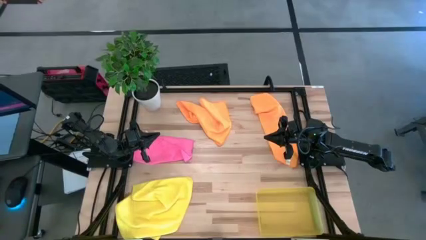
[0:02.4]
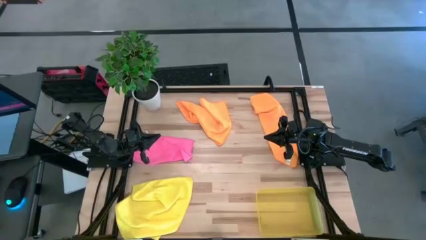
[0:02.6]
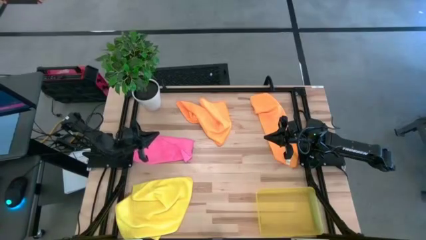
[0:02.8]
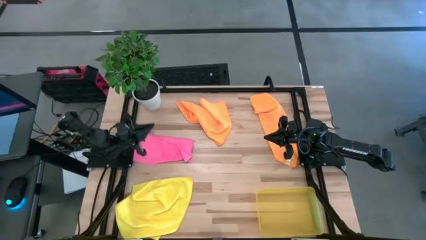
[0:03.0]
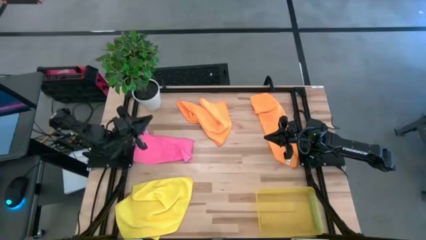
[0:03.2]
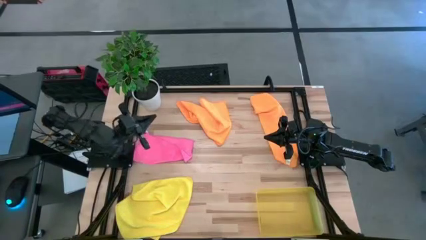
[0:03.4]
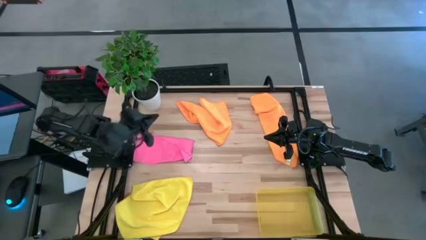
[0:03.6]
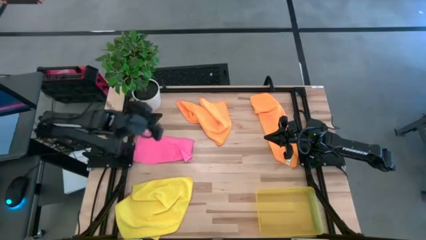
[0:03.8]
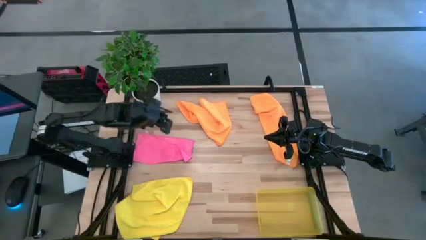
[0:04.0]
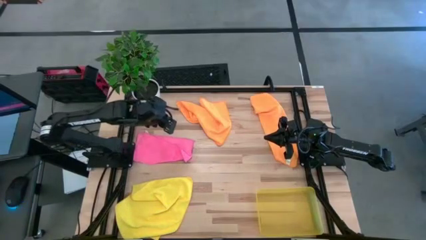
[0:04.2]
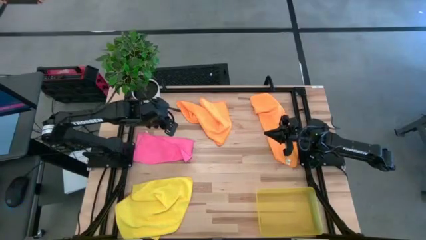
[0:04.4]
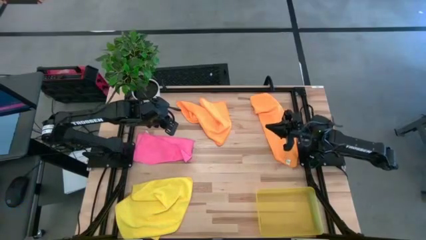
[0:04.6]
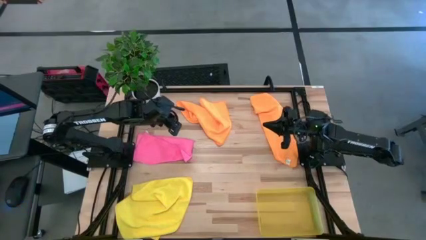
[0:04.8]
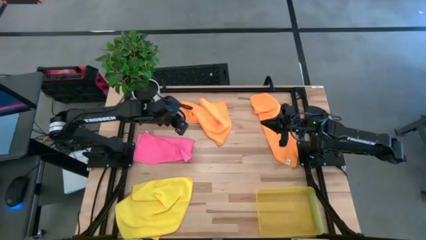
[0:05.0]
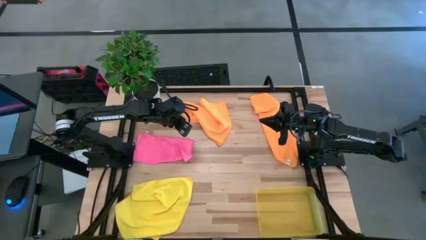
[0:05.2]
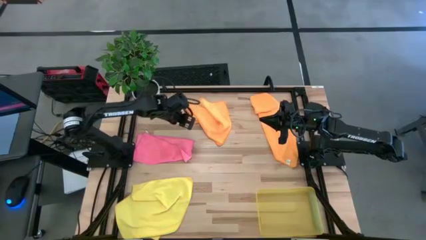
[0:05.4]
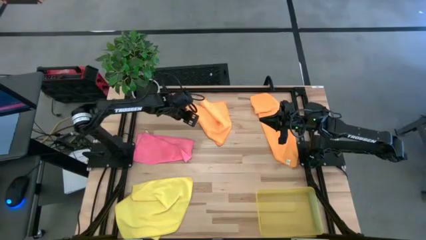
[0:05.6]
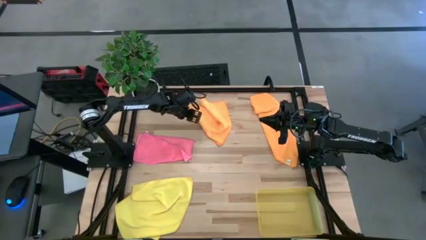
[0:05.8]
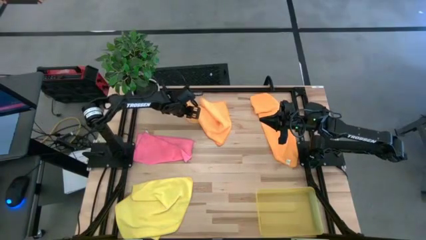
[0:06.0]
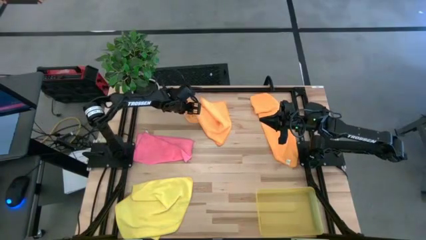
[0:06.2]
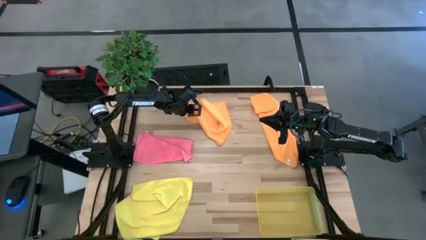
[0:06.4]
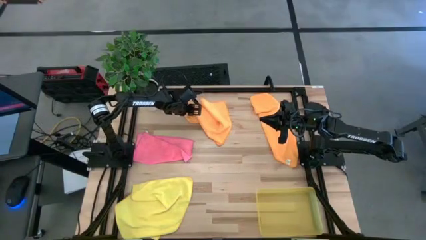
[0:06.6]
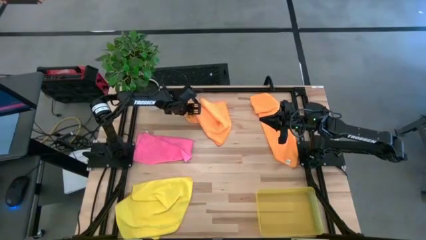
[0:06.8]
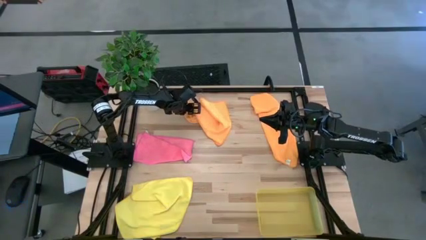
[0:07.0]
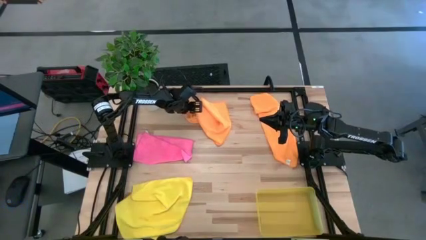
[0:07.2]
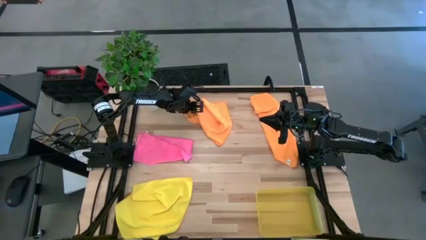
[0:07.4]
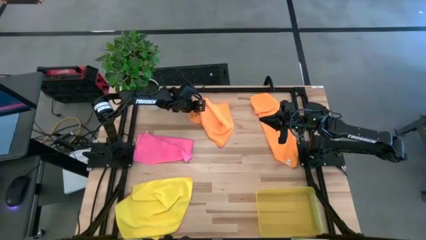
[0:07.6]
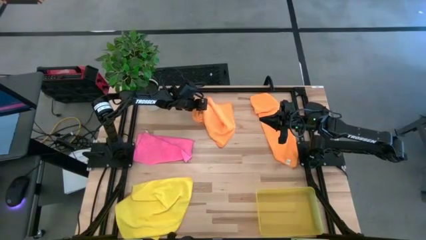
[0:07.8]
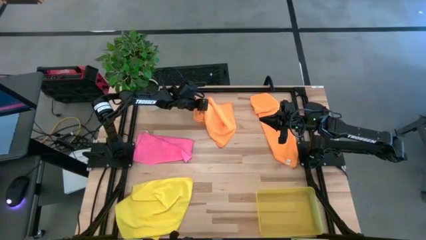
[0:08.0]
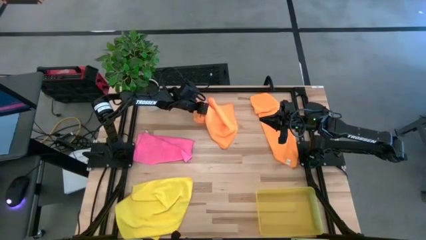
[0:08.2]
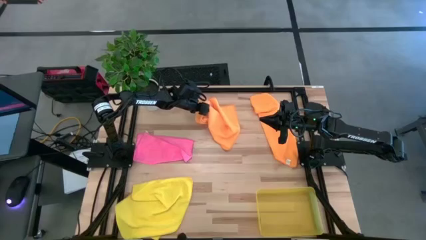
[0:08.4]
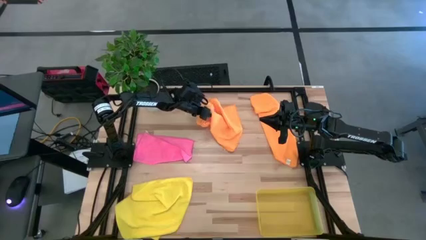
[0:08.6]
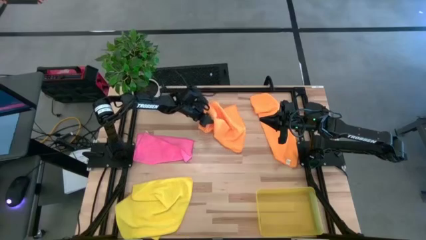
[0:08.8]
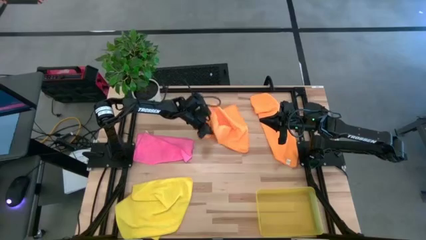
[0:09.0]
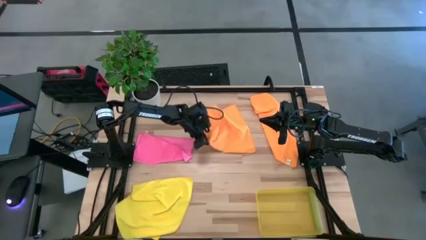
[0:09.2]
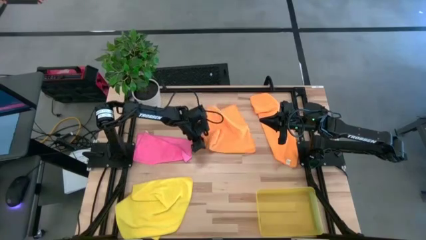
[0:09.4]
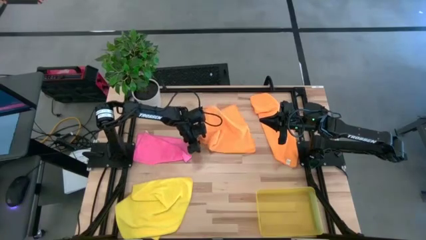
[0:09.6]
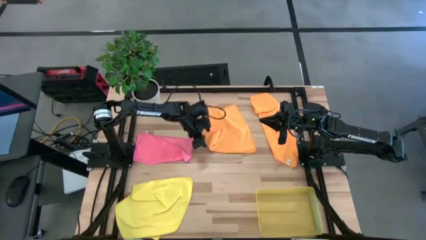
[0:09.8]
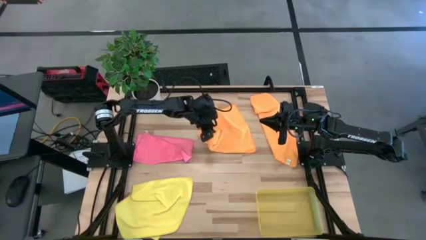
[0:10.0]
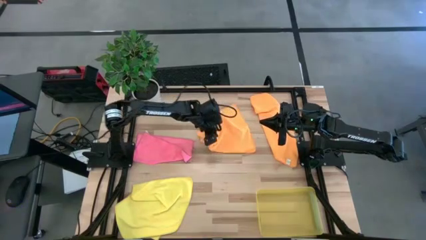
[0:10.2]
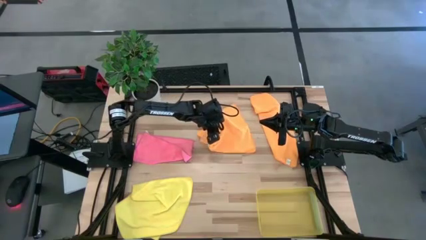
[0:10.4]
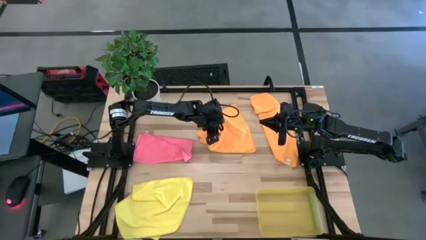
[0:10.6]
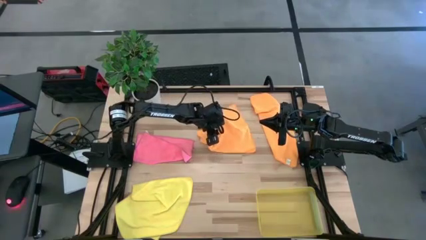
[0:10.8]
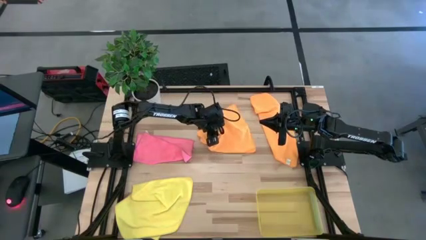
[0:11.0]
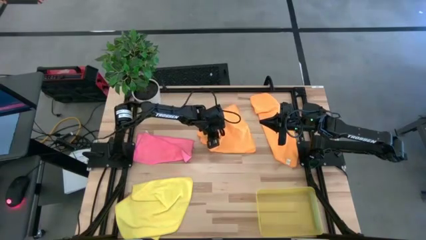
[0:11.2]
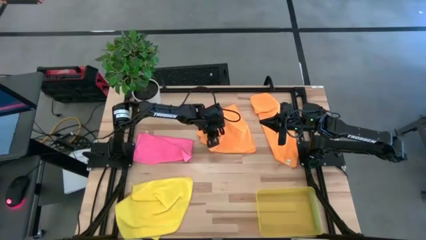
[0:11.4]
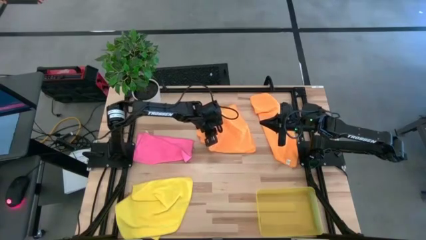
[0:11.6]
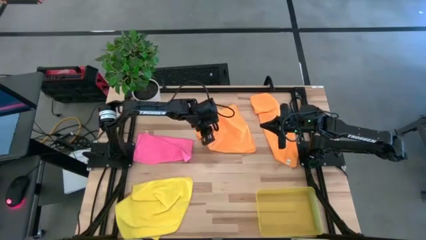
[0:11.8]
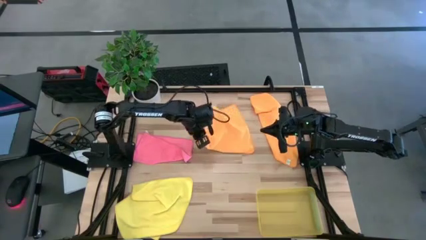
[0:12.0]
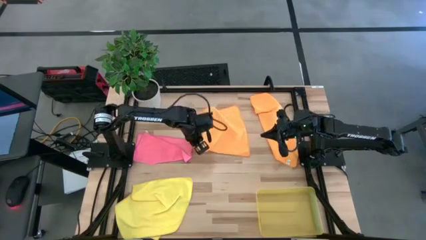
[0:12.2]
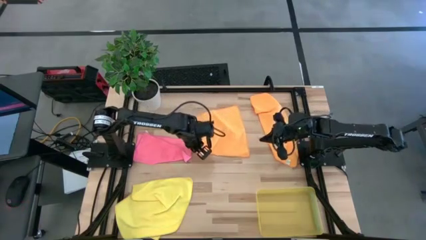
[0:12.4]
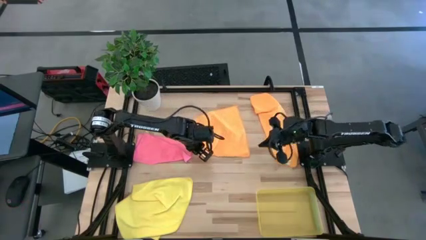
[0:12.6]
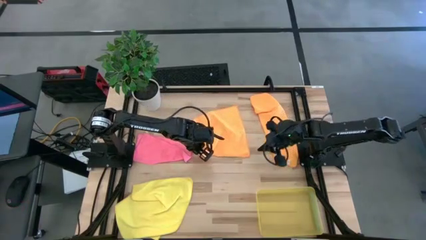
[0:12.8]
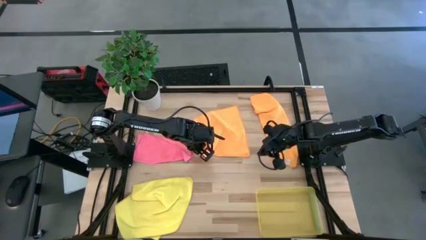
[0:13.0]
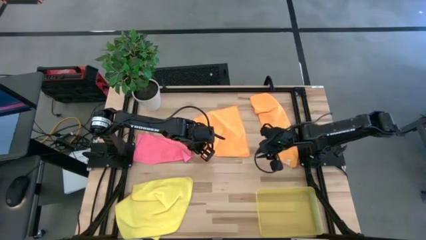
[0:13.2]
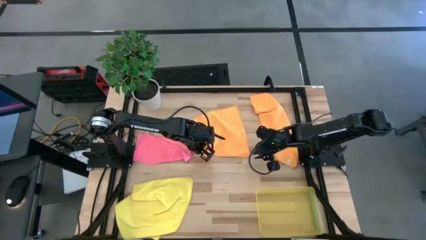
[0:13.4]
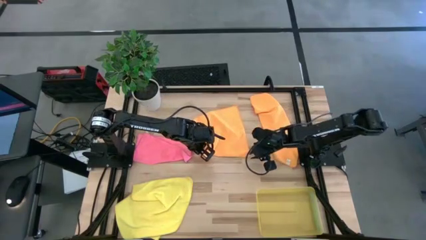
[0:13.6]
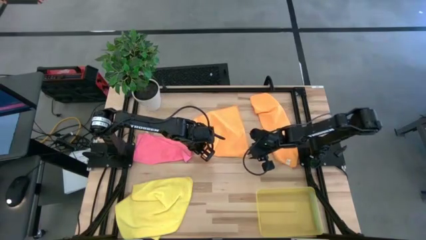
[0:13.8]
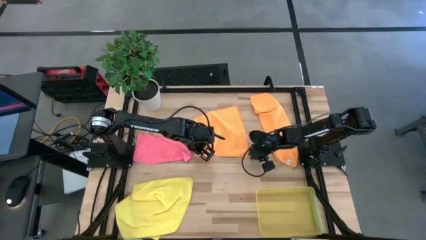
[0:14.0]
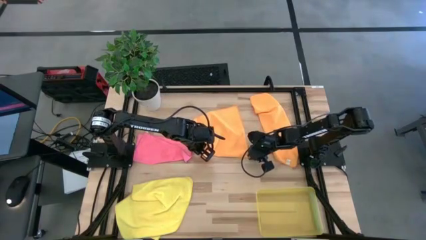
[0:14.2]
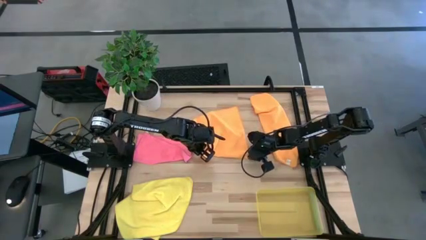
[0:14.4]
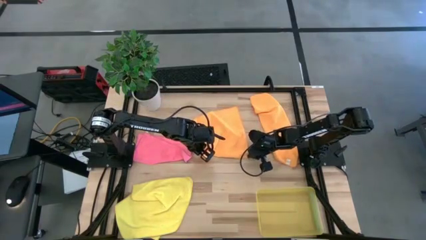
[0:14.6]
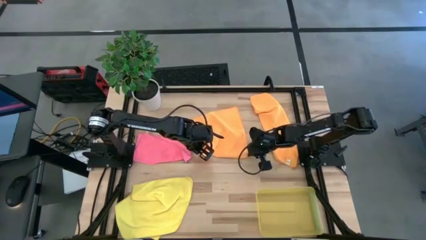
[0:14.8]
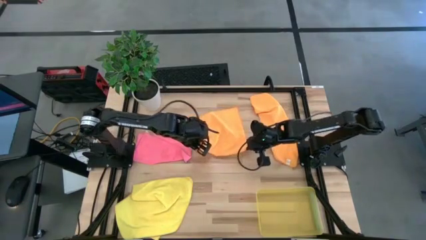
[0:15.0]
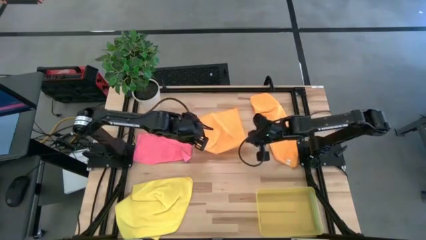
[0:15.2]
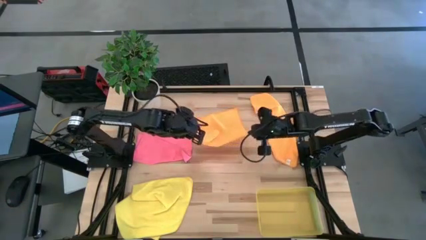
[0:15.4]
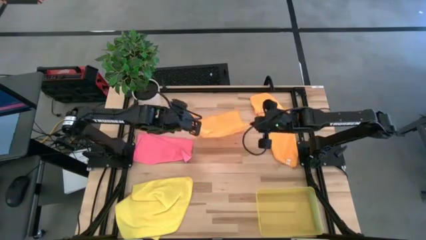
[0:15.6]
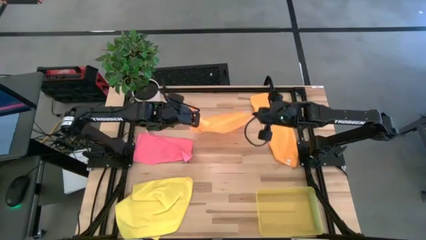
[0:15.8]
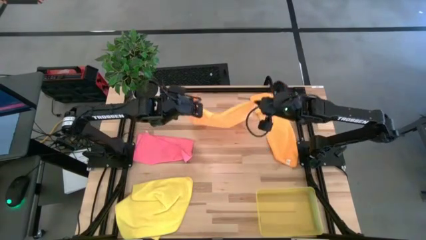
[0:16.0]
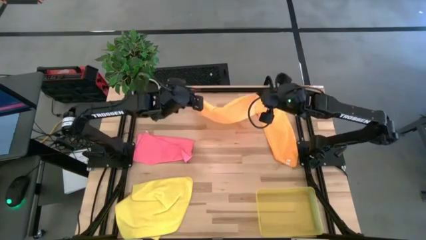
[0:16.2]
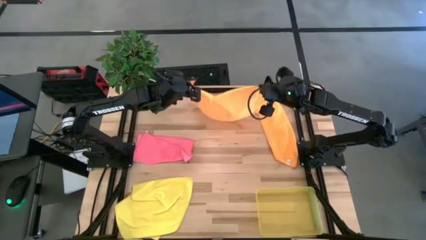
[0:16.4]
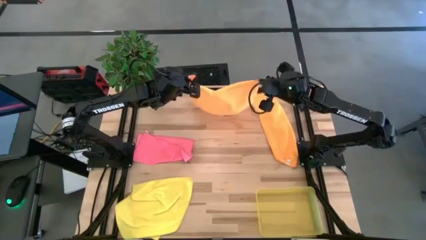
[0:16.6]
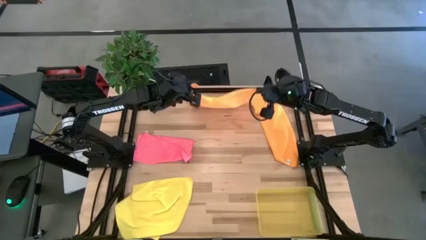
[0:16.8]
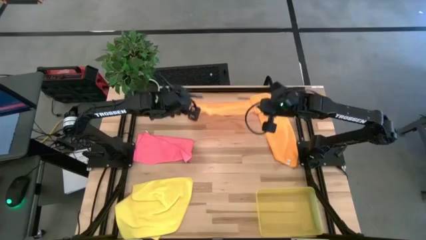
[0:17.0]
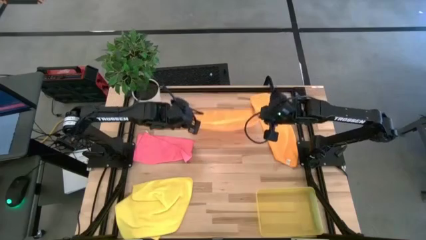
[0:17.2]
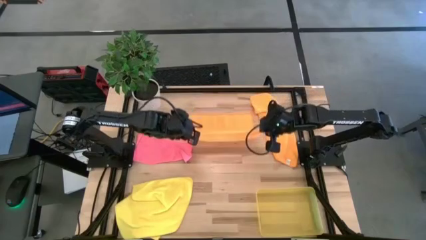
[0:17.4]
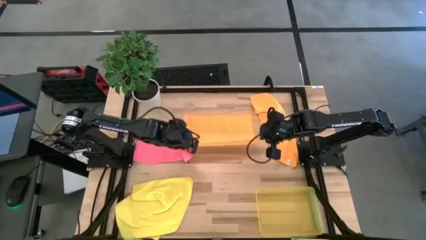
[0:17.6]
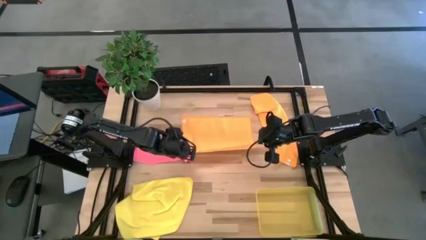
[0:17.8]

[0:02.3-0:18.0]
Task: Fold microfiber towels
Fold the left orange microfiber cloth
